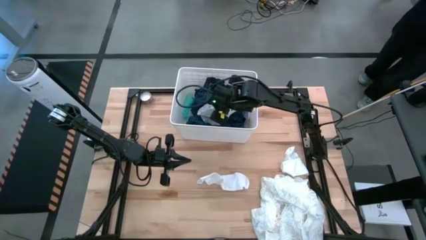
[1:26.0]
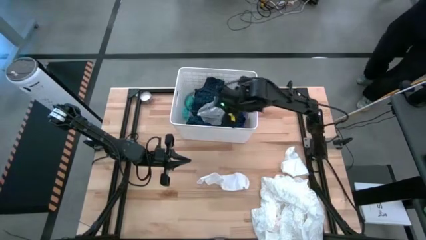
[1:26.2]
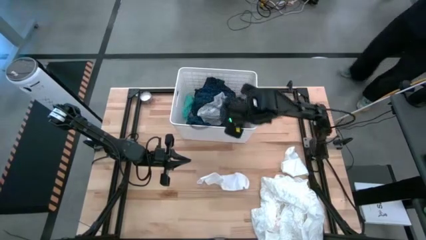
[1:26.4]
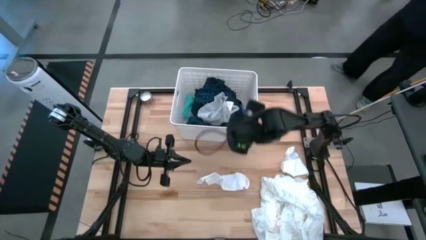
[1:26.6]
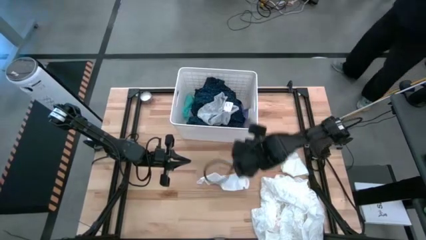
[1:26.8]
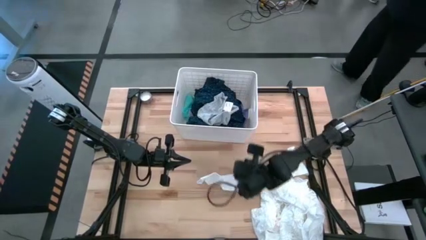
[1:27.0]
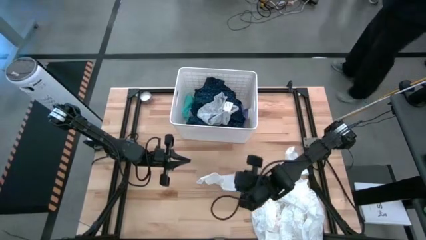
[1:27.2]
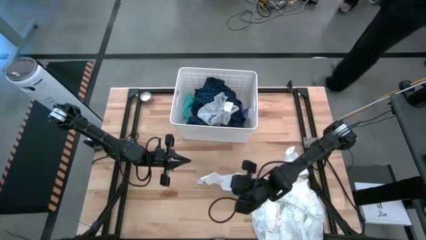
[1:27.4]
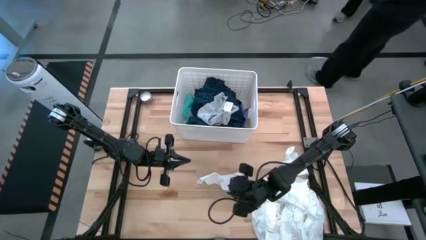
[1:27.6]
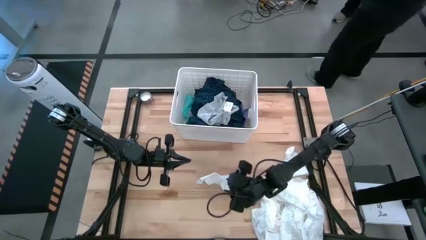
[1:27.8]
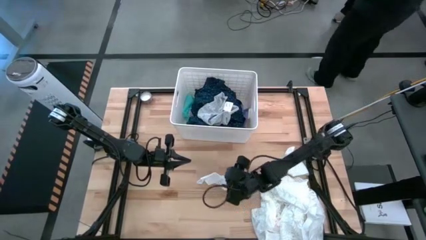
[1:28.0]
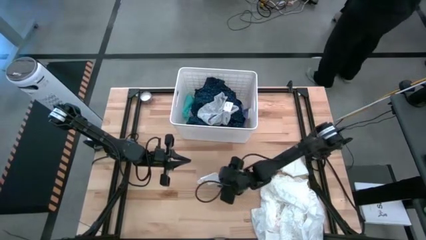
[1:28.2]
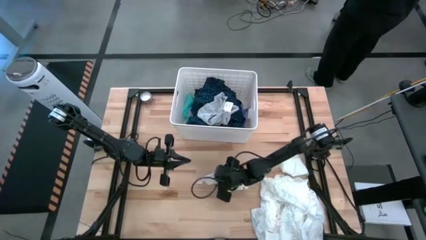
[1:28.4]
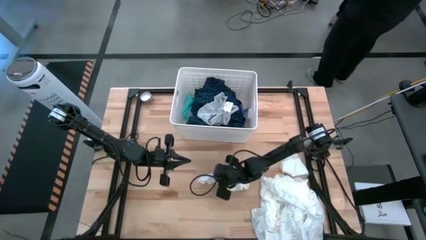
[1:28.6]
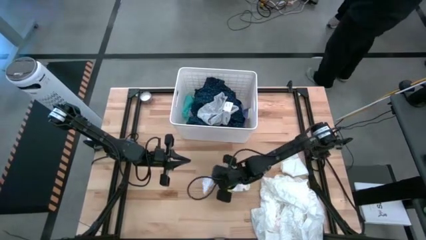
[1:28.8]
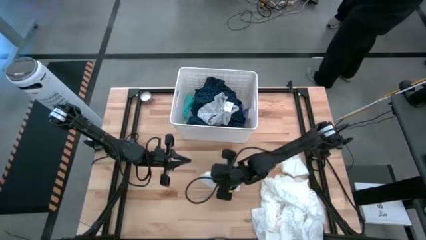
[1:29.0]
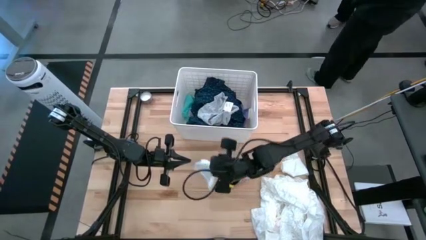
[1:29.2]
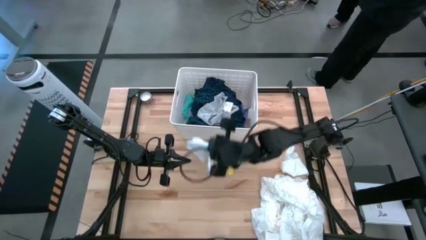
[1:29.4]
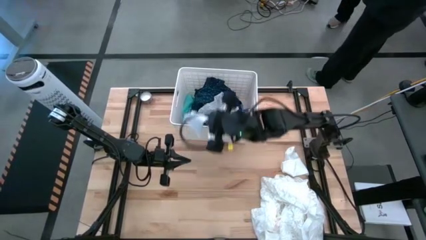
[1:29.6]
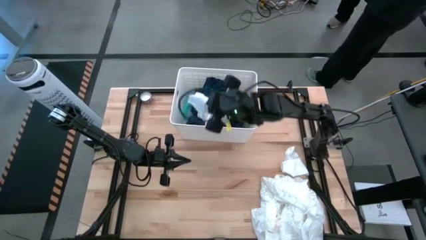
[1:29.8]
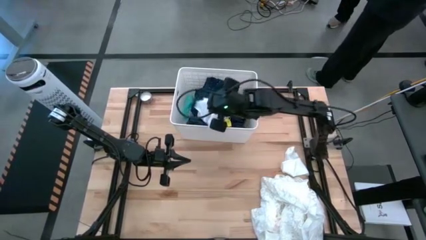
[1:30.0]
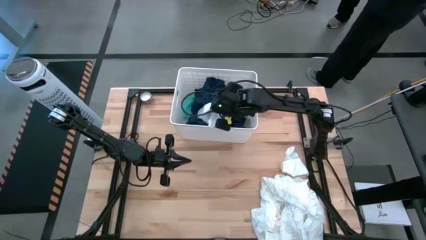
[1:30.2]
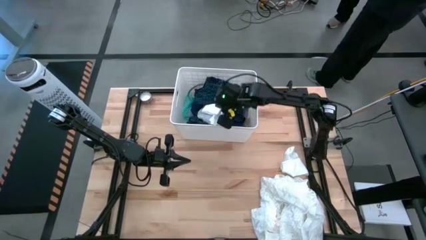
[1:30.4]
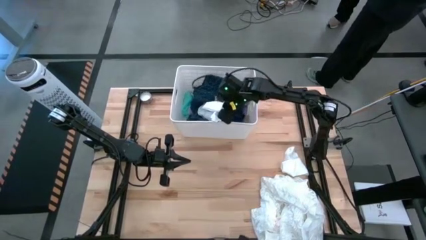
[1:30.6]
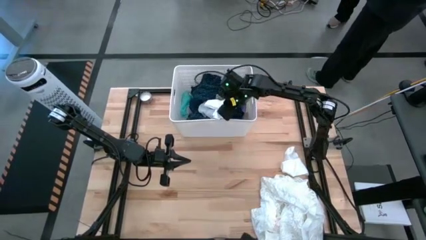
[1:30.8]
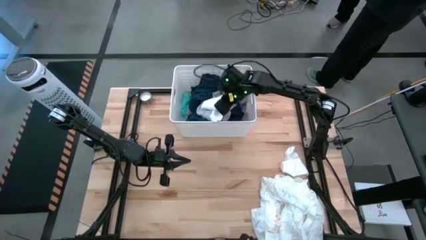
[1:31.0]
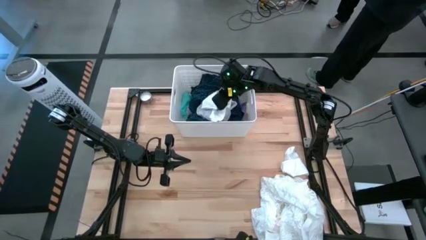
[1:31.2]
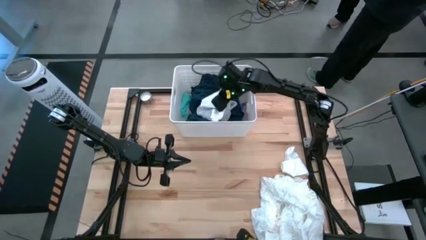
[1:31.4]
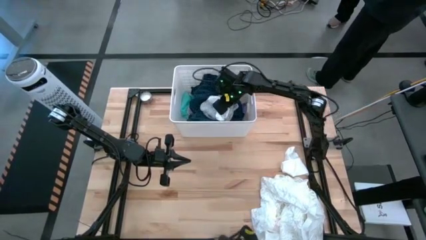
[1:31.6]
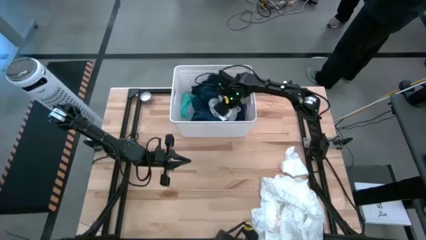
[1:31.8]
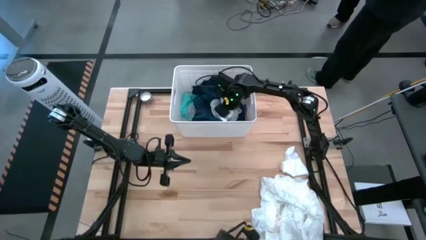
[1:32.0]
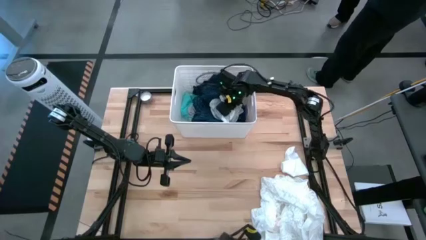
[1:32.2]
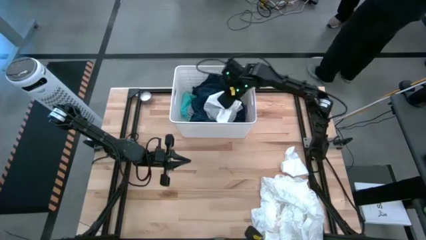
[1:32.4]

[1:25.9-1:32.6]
Task: Sort clothes
Put the white sock into the laundry organizer

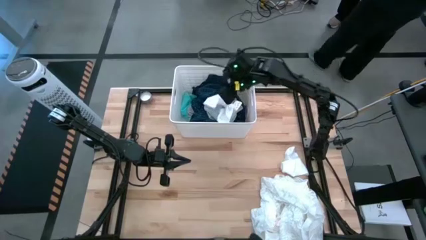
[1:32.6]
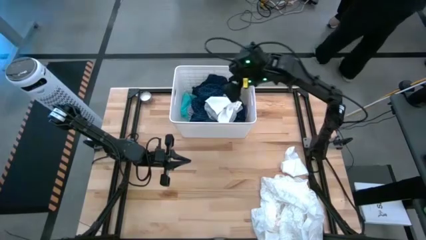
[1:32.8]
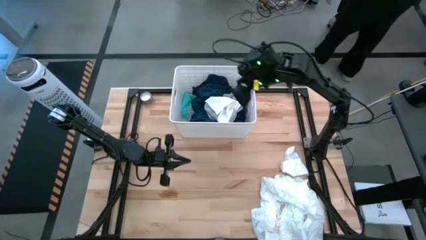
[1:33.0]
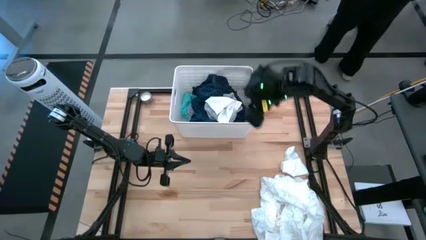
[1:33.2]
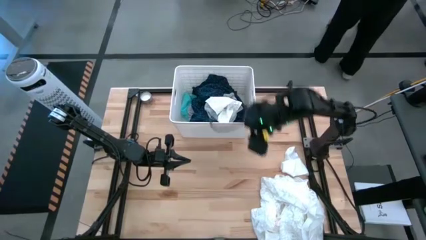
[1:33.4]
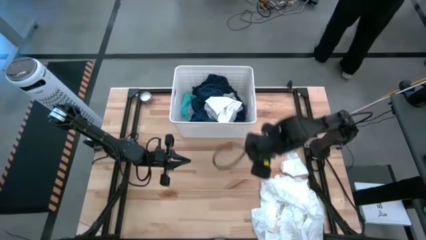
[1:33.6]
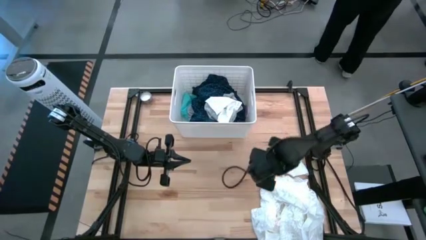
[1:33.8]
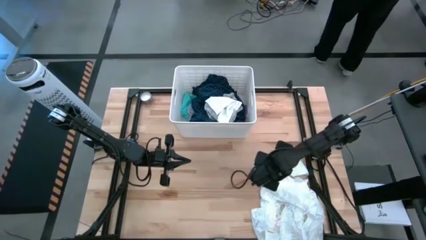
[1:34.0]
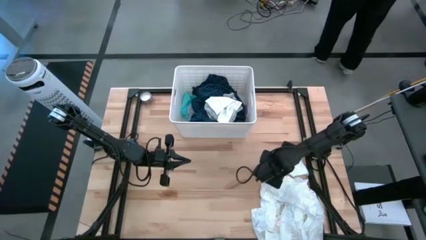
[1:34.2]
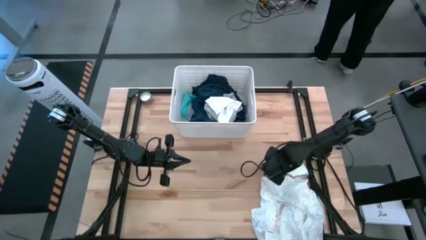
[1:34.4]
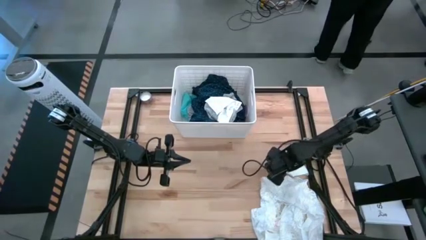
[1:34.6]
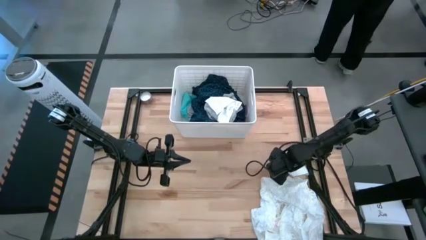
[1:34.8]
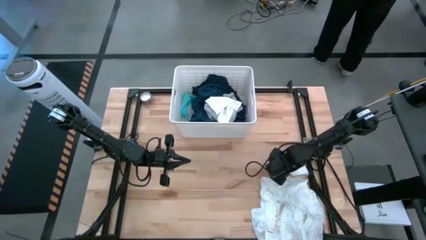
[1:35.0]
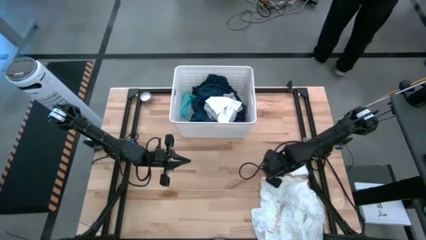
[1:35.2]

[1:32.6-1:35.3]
Put the white sock into the laundry organizer

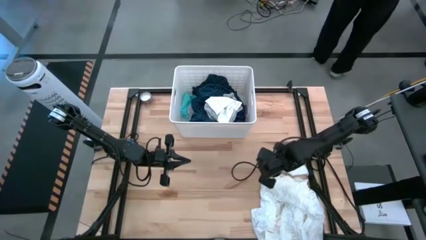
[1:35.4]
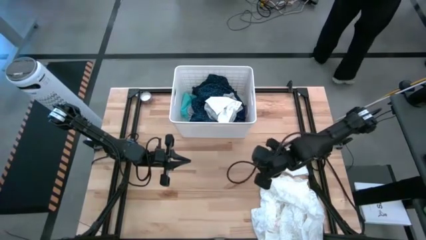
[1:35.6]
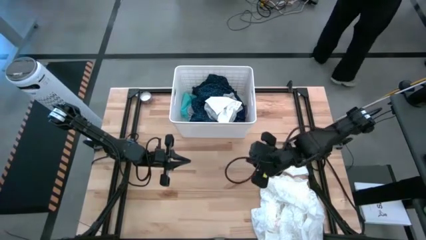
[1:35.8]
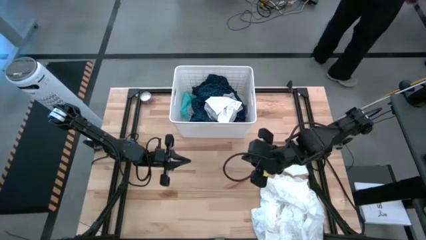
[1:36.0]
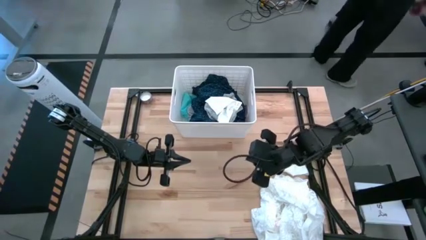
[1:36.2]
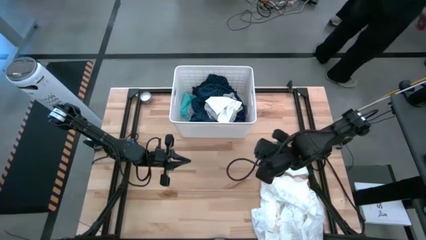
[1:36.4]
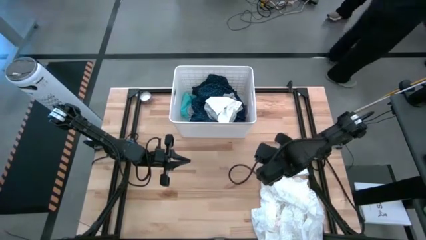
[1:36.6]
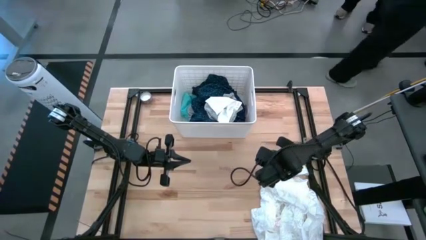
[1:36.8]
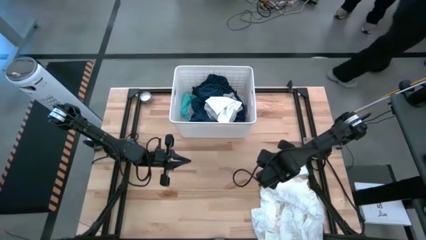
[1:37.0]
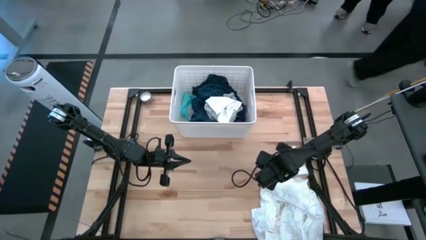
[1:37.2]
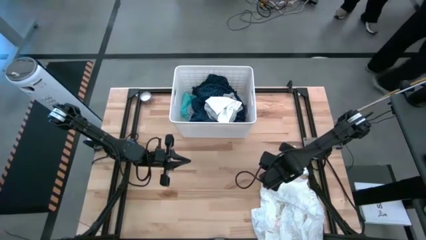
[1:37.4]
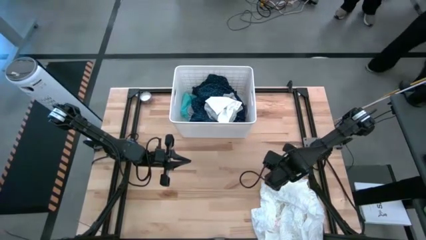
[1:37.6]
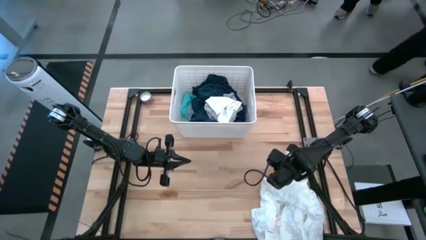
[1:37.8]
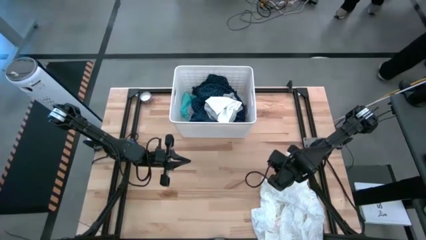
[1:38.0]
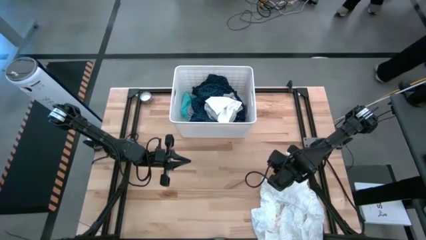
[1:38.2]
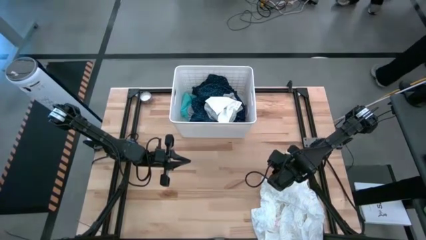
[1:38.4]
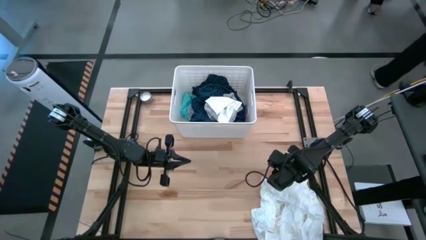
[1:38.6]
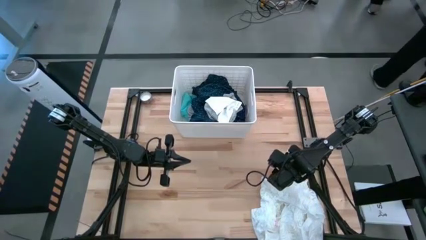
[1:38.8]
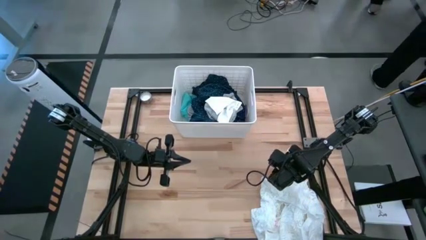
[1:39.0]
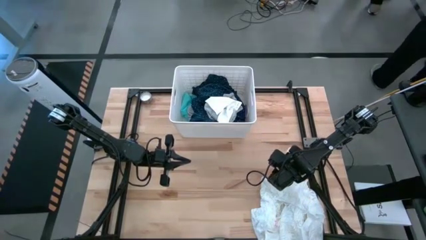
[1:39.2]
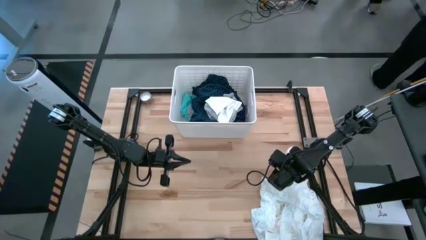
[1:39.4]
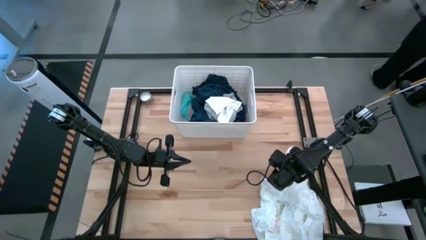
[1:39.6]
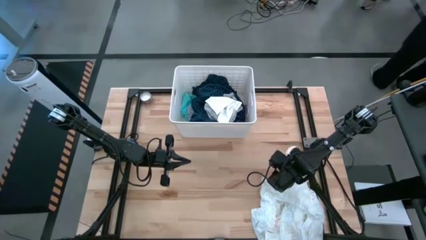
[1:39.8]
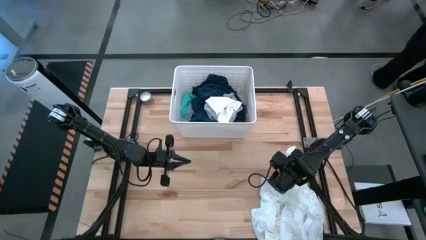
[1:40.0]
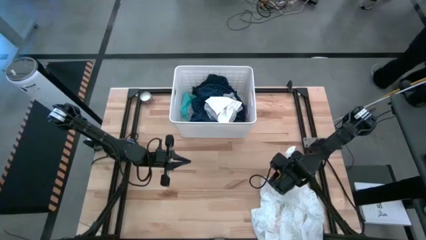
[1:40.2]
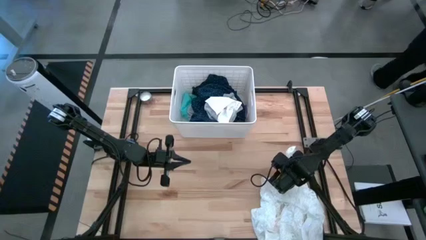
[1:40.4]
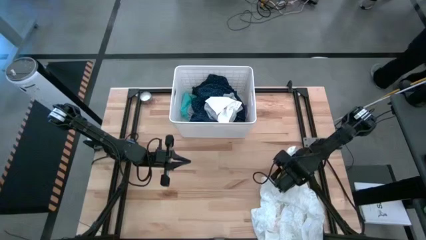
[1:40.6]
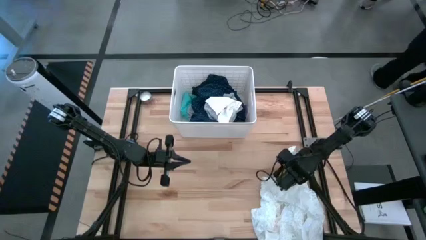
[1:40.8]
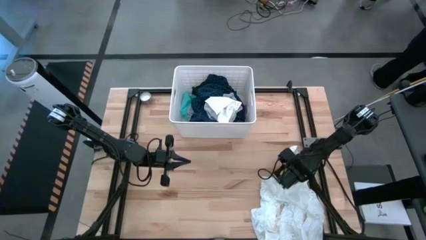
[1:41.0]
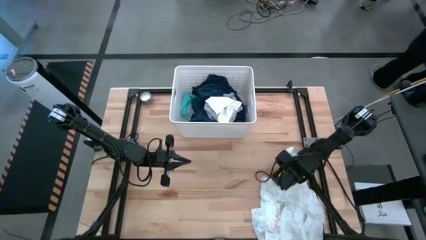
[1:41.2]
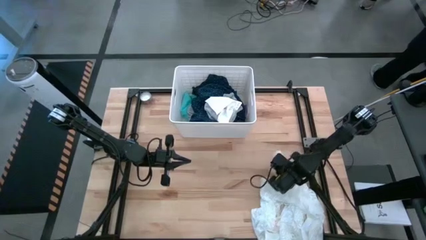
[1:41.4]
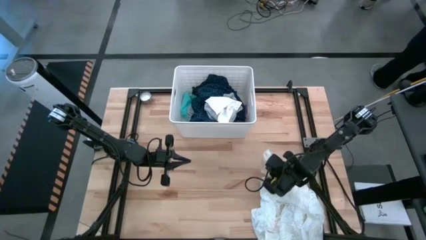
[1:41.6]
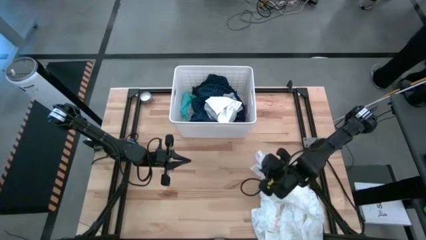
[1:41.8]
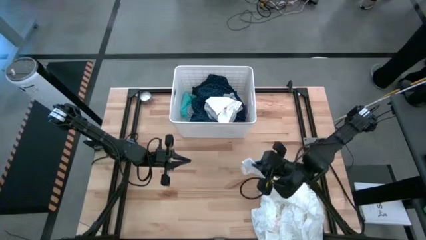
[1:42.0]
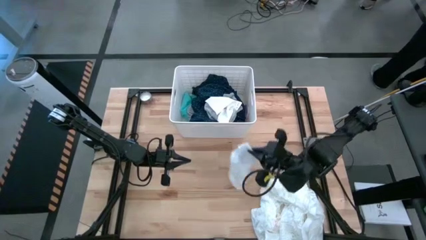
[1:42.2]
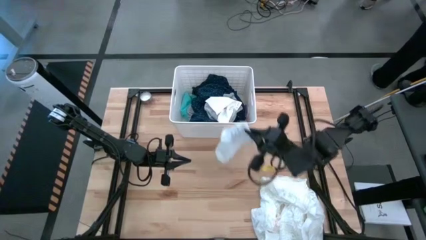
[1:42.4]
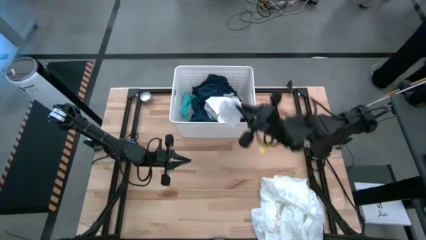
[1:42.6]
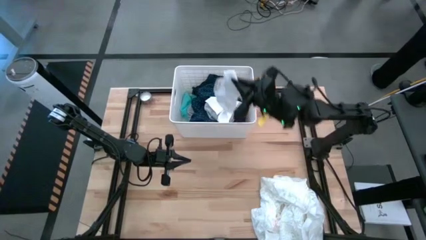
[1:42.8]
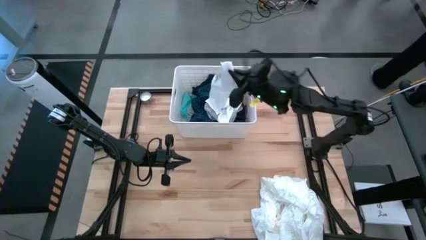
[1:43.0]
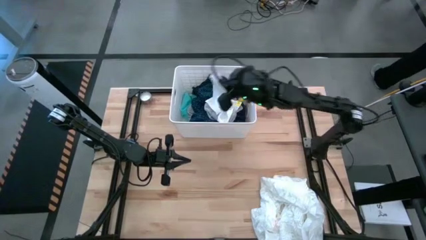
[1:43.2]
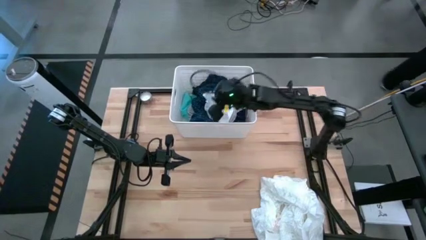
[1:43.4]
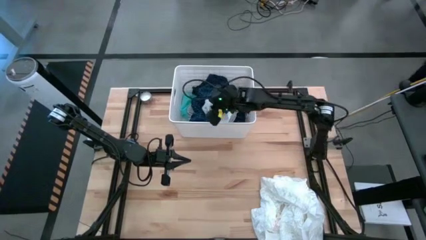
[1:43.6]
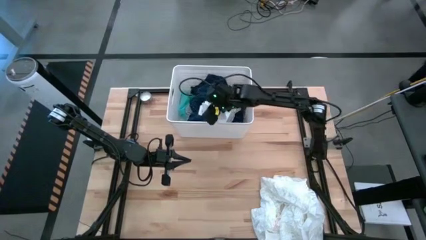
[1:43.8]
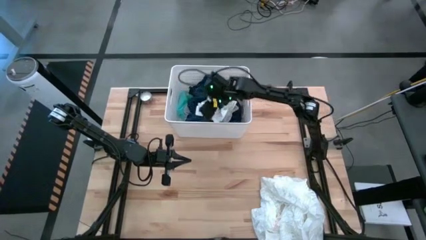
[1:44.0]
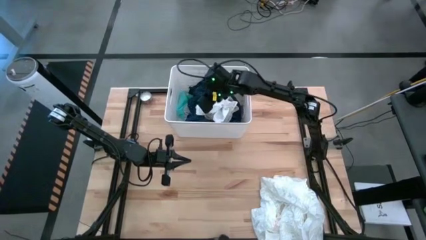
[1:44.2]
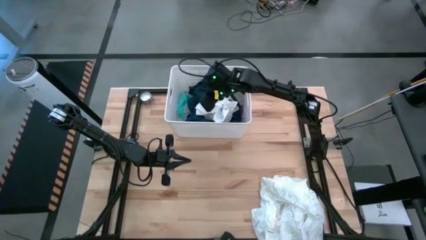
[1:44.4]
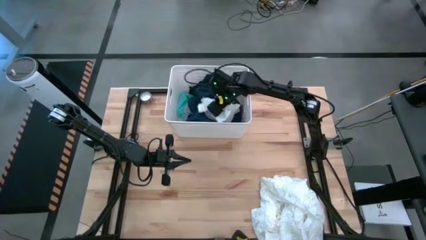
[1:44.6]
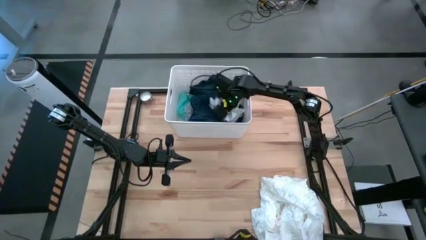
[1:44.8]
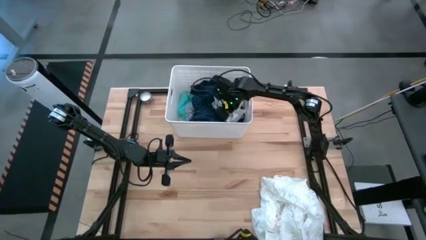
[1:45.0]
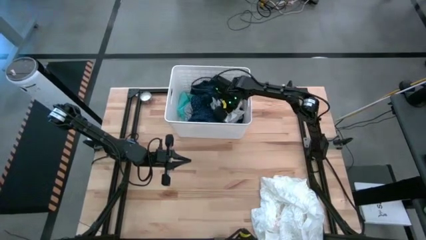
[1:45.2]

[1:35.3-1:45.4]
Put the white sock into the laundry organizer
